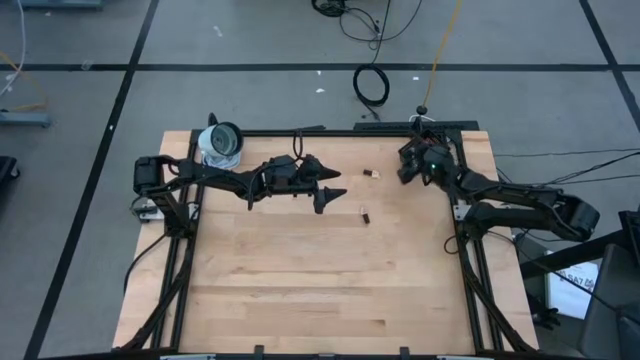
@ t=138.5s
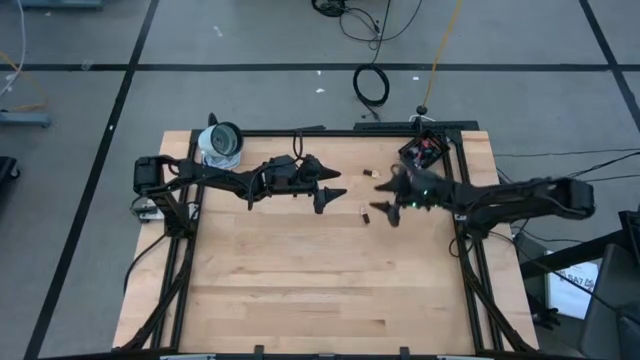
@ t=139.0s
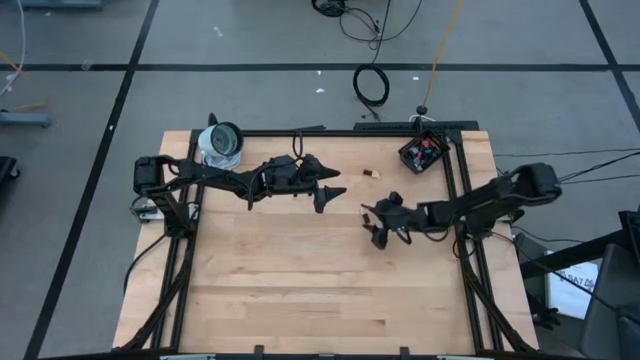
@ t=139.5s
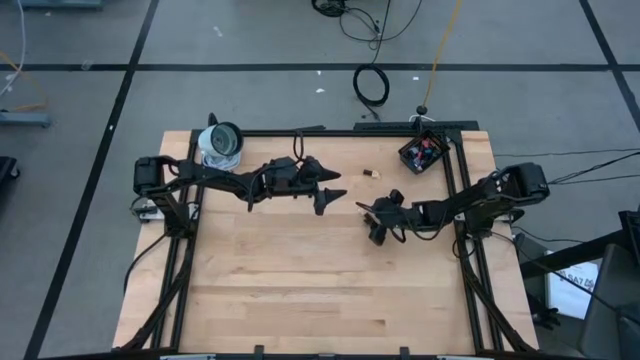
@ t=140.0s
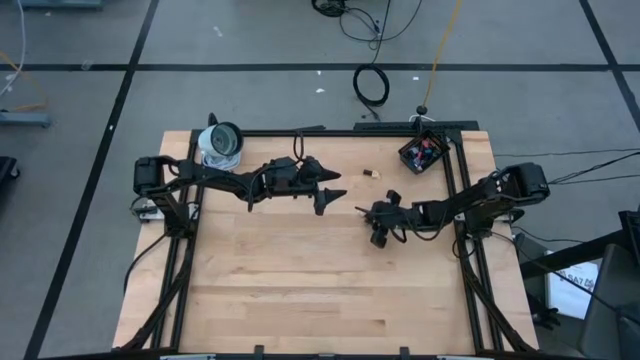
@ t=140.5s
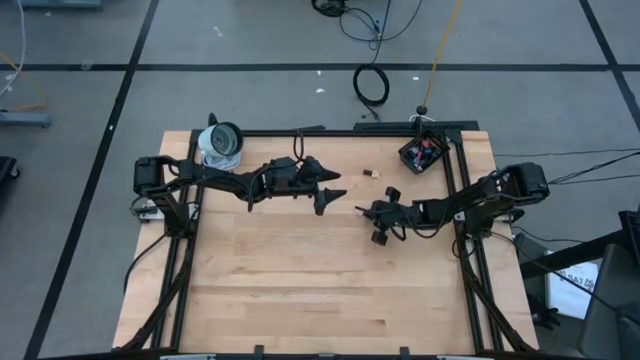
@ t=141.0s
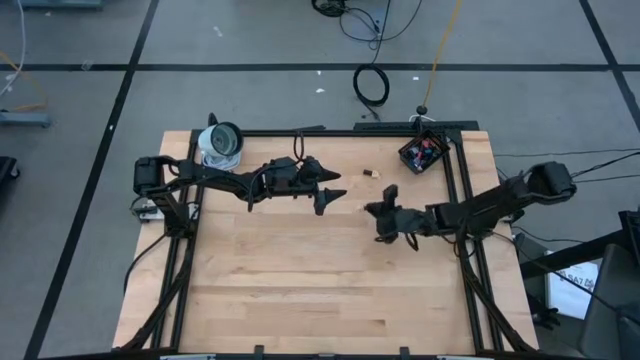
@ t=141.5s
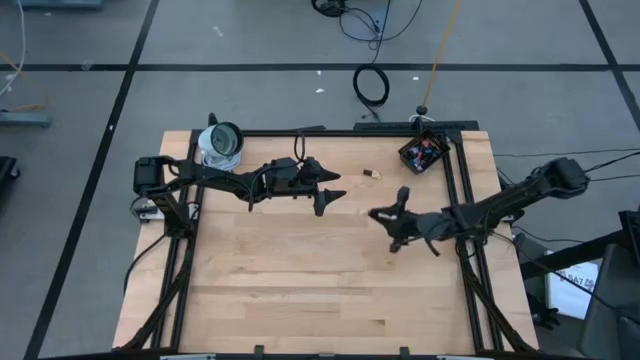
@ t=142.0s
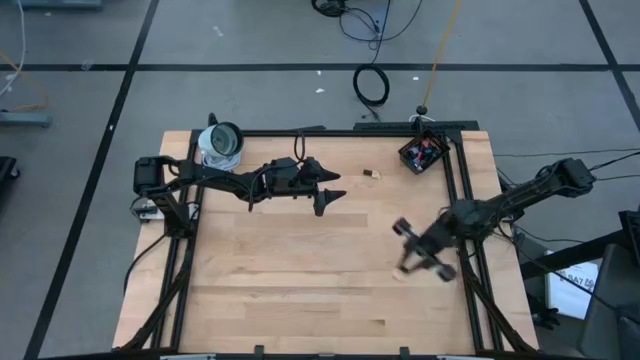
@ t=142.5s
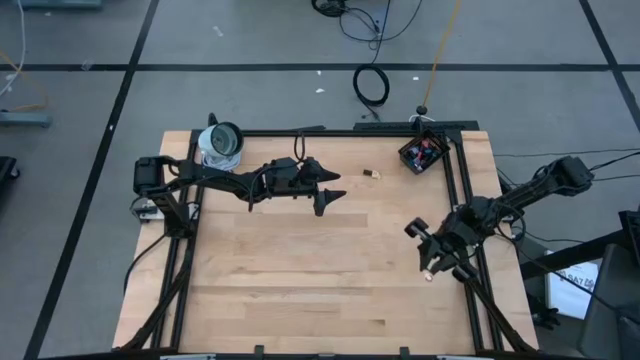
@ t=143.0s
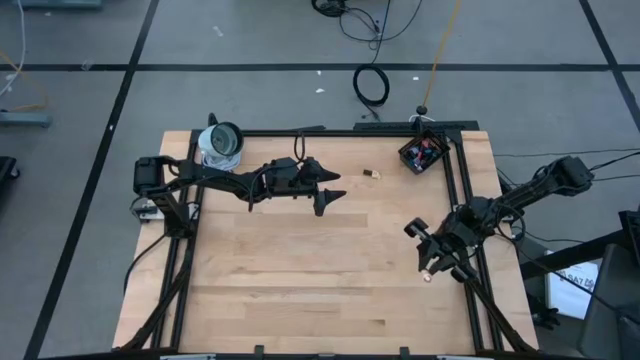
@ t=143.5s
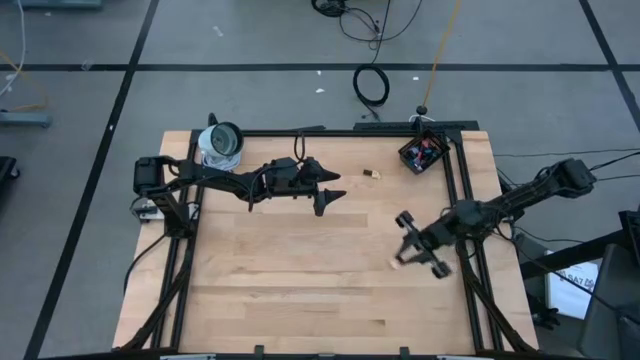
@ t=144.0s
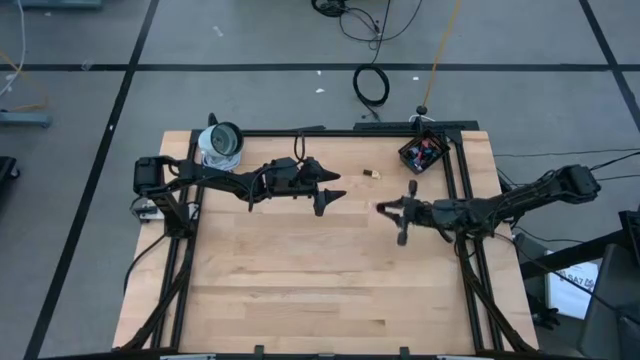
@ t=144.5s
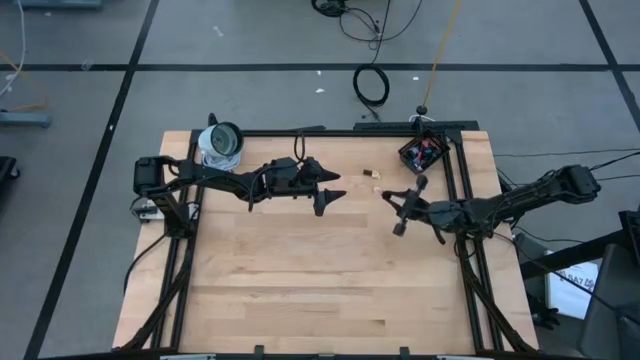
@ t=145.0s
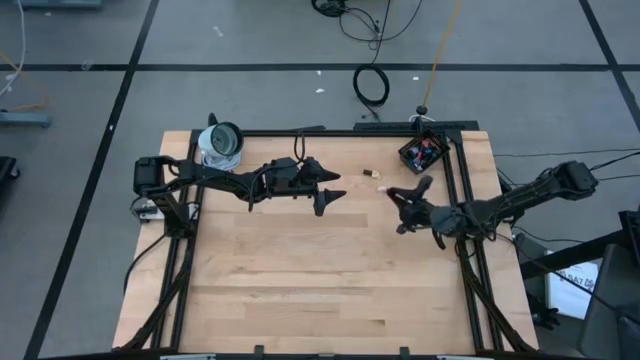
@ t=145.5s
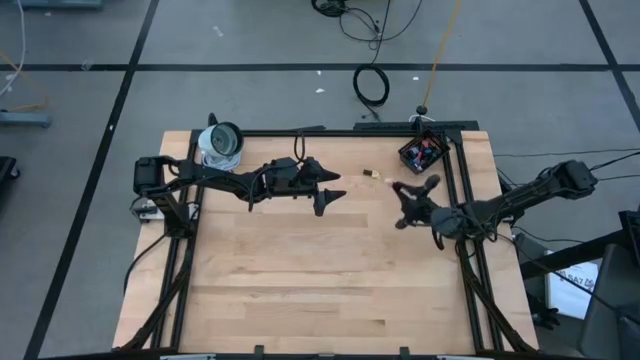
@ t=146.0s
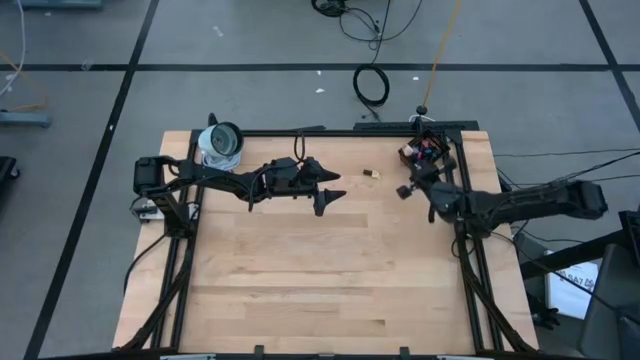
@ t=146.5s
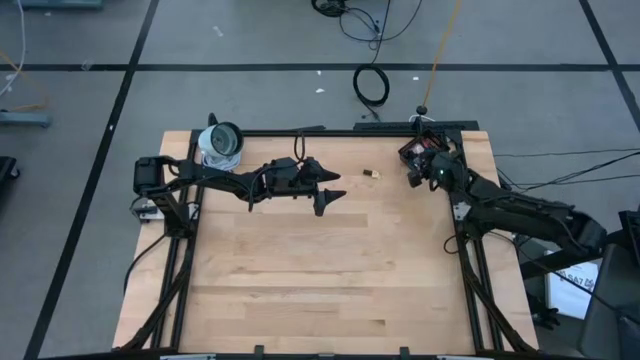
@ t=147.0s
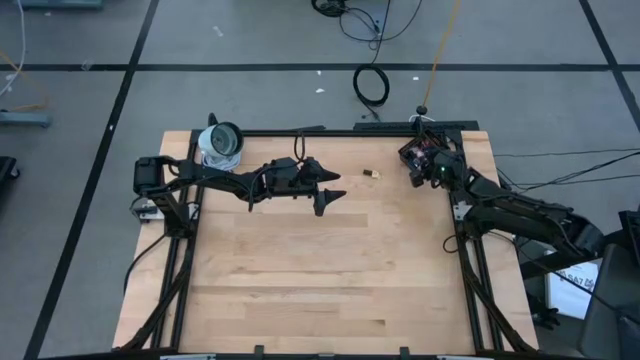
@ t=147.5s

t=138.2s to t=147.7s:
Task: Pick & Place Nail Polish
Put the light pink nail polish into the black bin

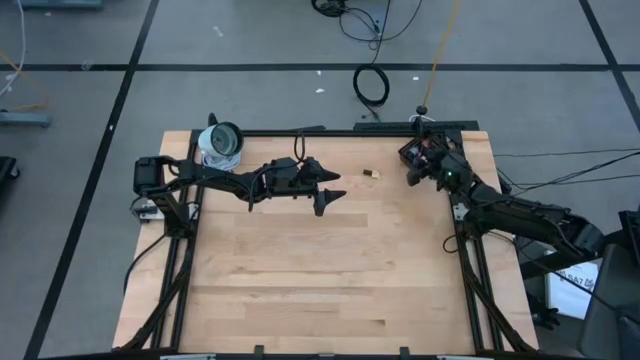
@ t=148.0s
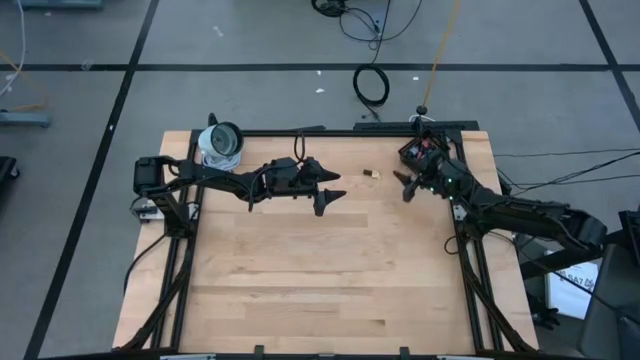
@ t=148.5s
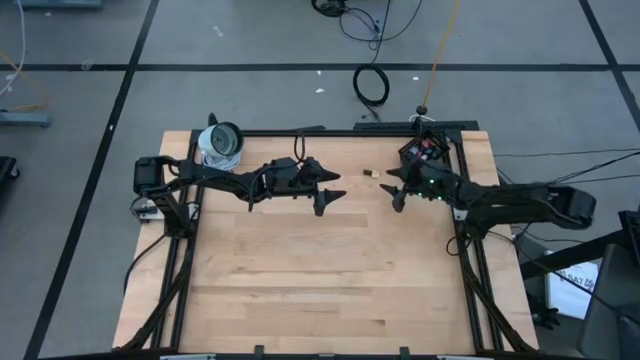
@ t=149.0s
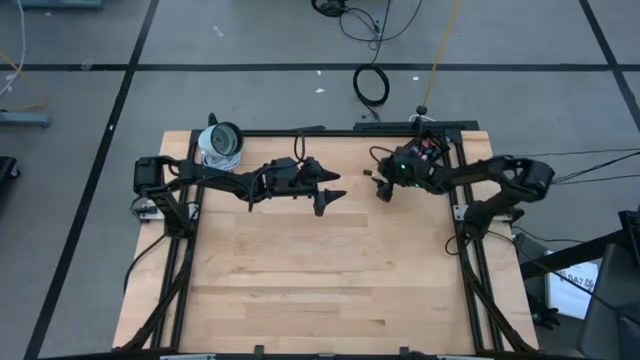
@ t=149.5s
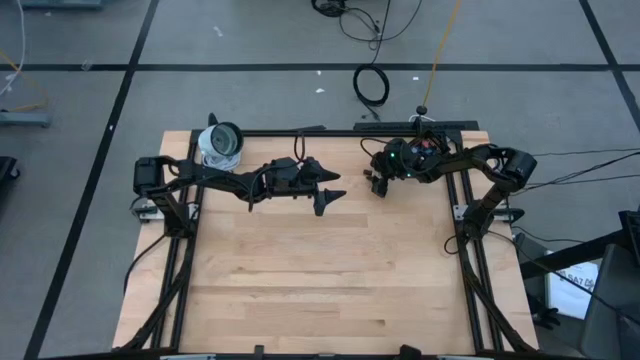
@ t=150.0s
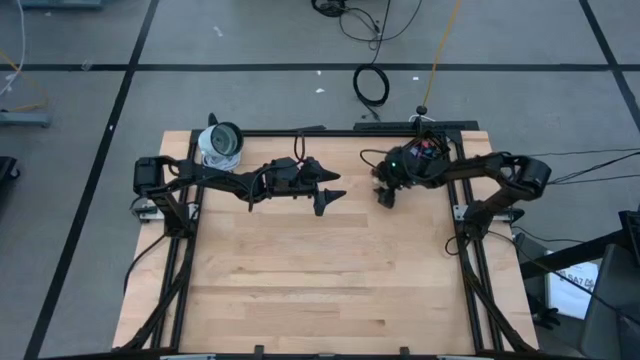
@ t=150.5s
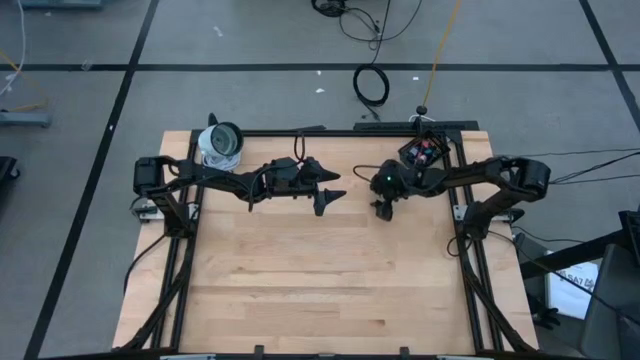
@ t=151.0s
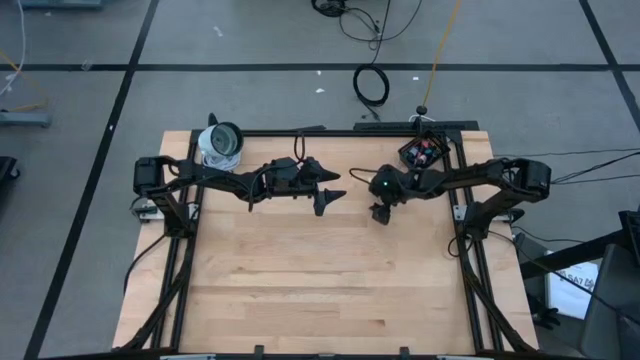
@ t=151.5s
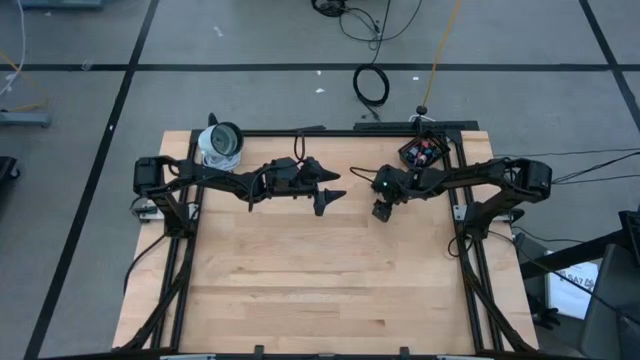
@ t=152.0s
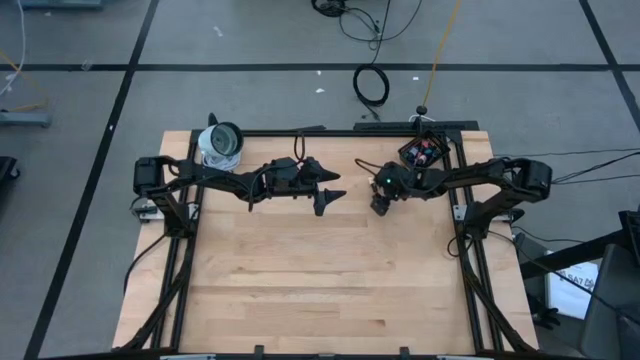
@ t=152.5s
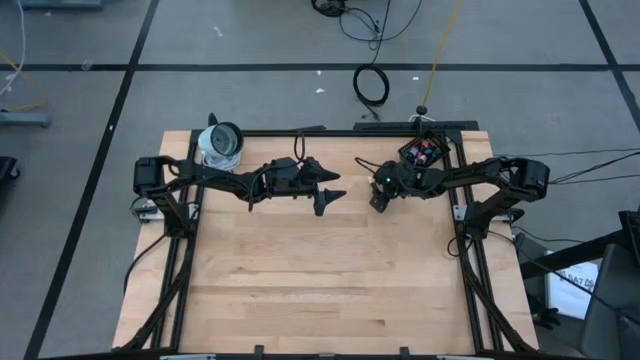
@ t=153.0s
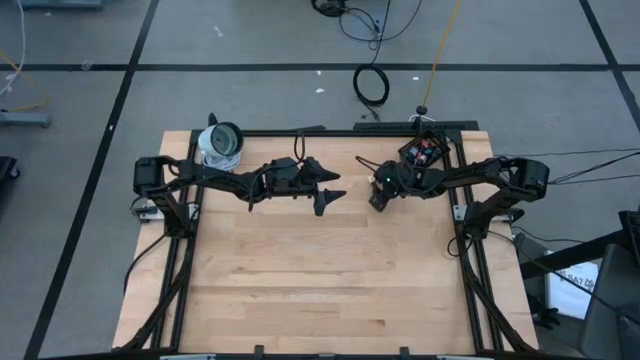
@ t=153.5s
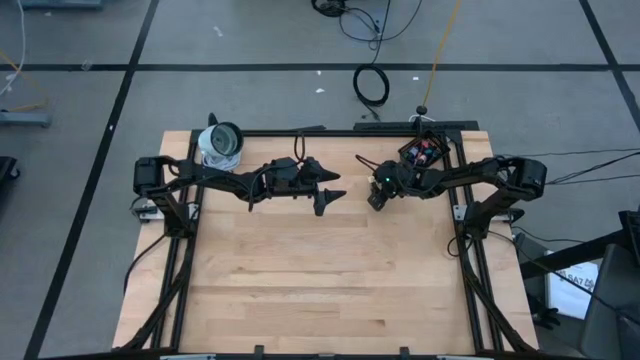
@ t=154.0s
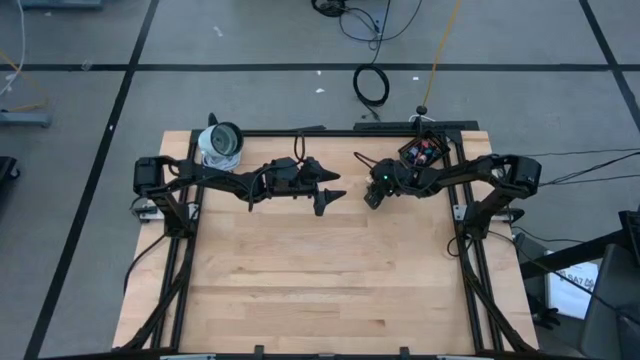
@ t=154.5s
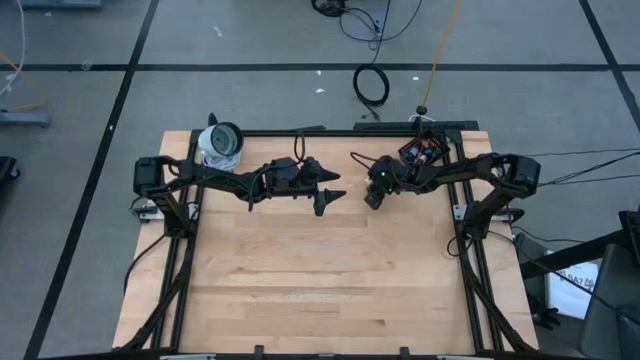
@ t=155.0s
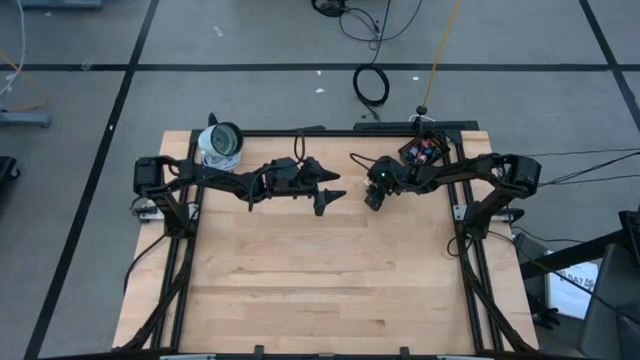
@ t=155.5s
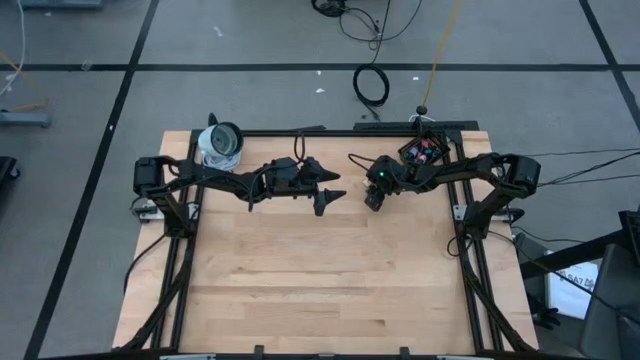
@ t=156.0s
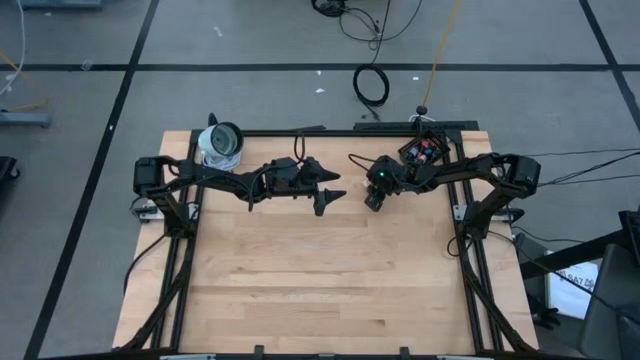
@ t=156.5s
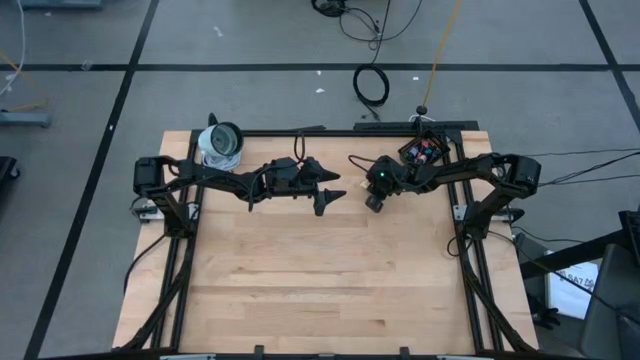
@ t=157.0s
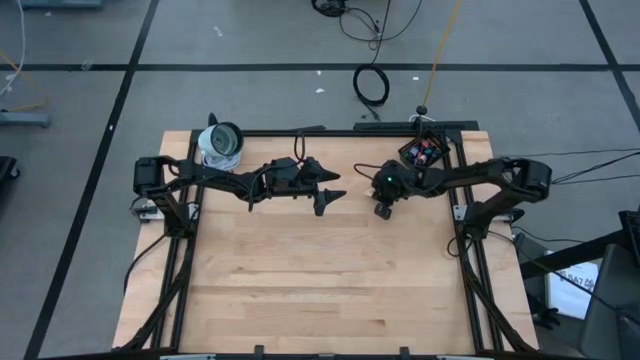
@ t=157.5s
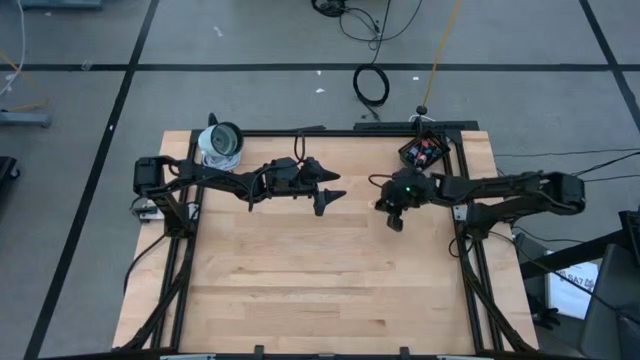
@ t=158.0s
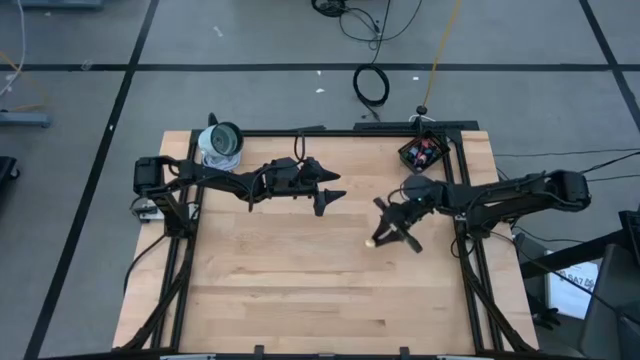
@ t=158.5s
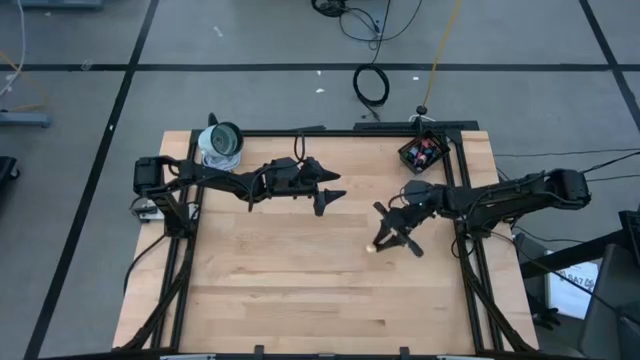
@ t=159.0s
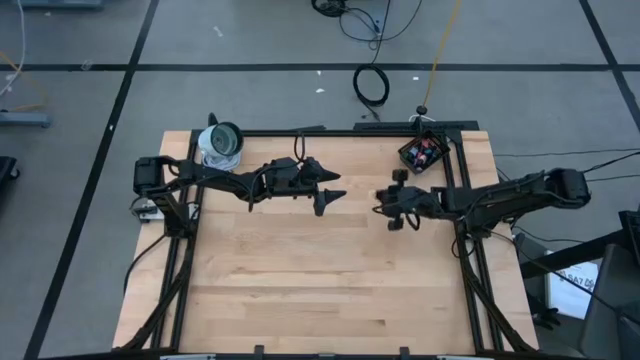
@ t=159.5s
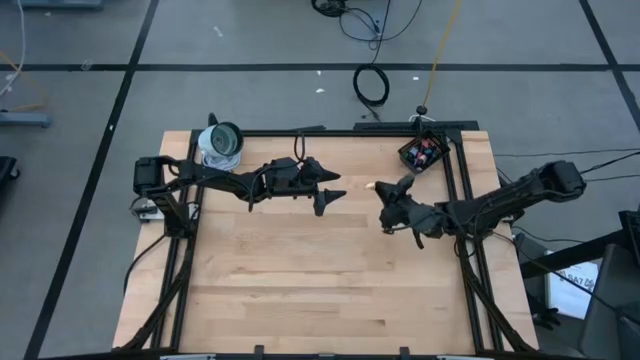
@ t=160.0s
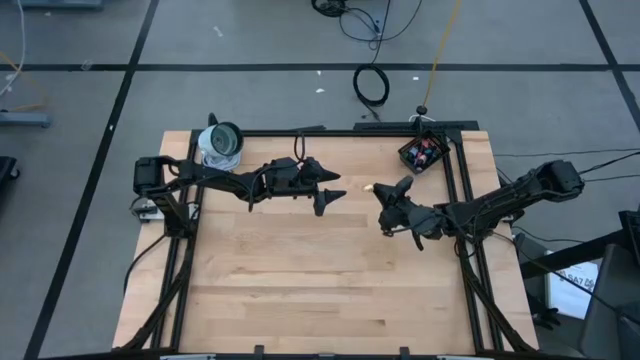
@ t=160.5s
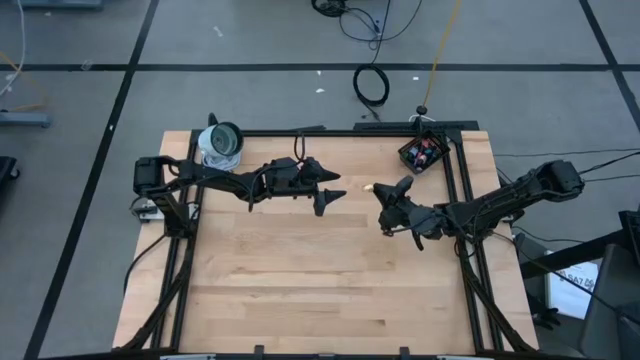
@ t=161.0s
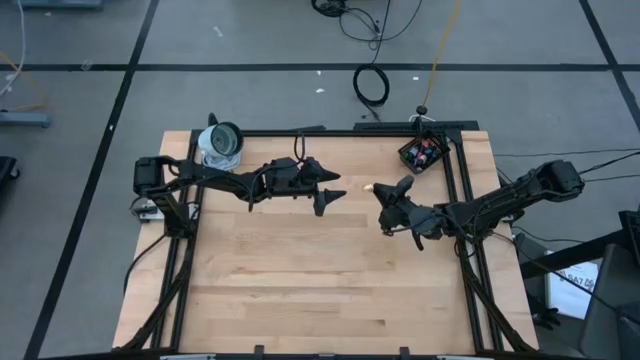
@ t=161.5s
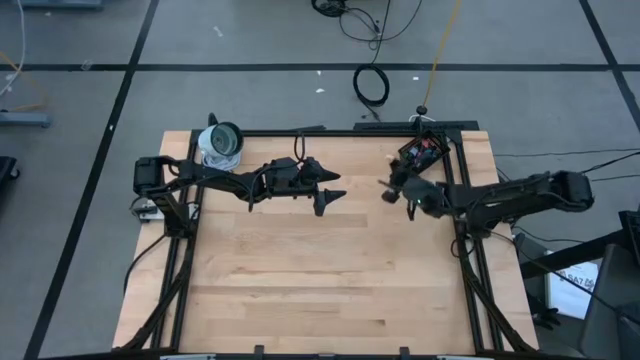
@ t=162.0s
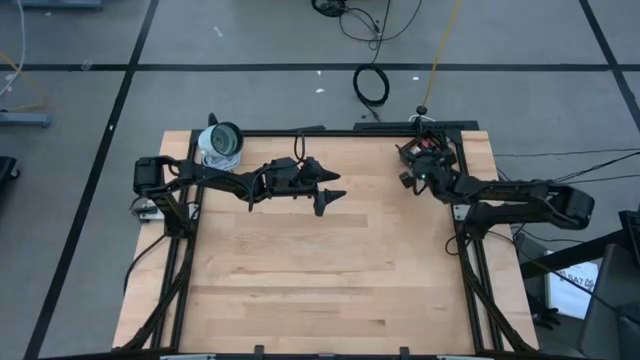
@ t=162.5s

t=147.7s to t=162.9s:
Put the yellow nail polish into the black bin
